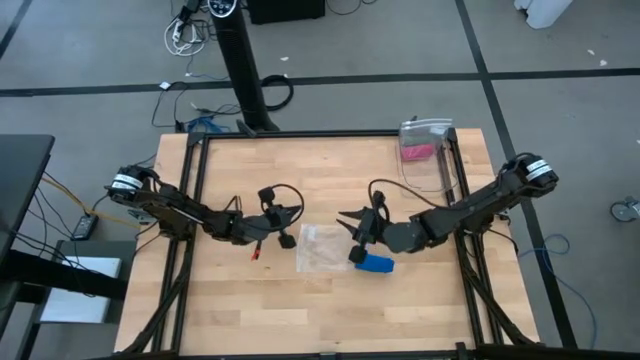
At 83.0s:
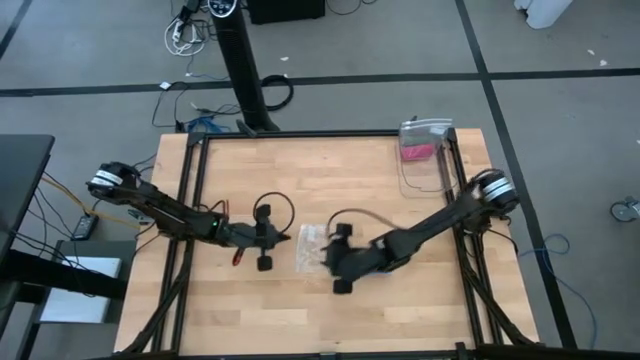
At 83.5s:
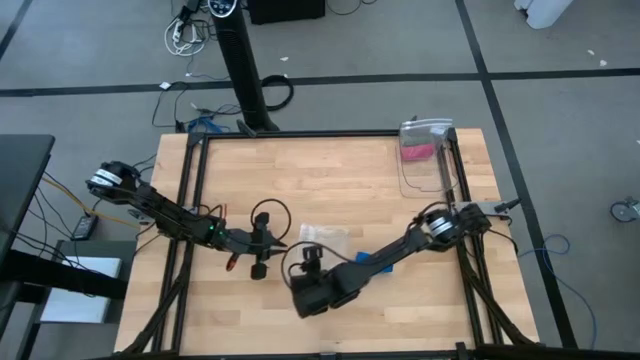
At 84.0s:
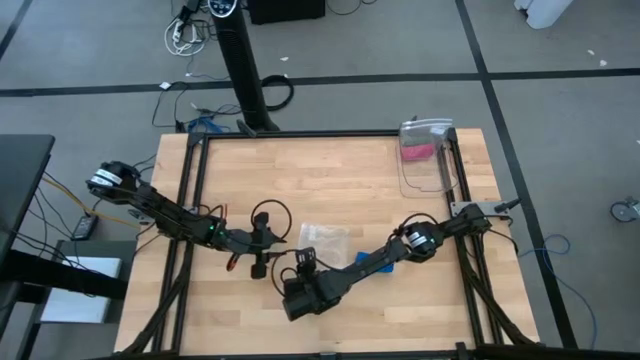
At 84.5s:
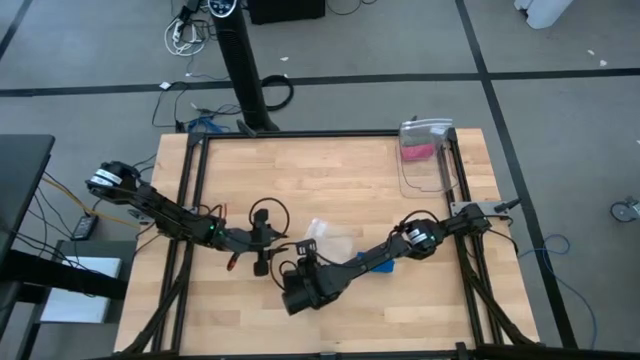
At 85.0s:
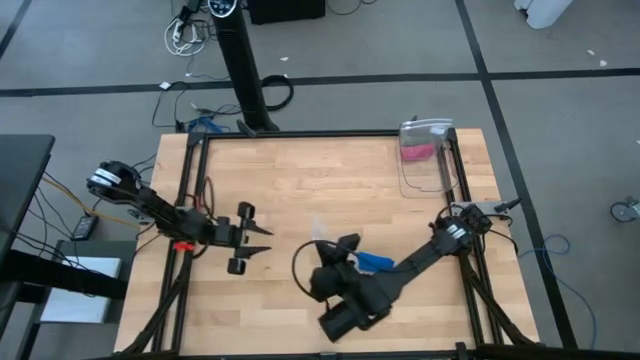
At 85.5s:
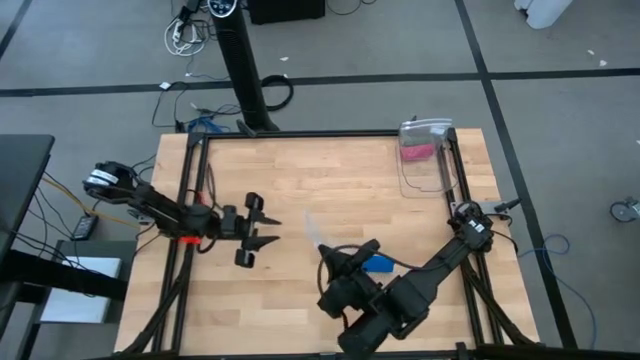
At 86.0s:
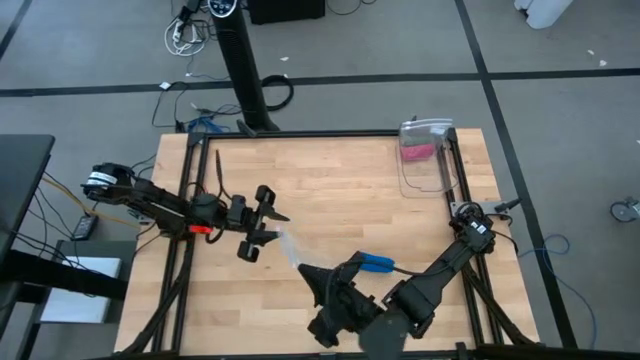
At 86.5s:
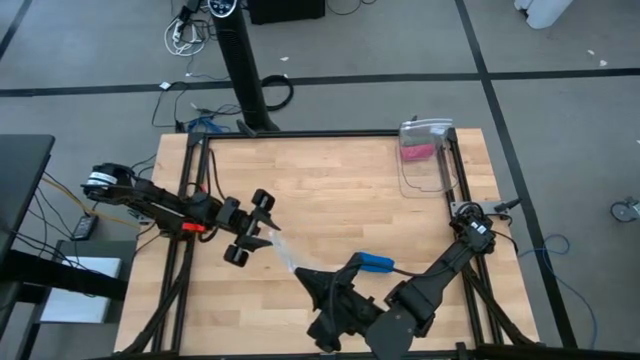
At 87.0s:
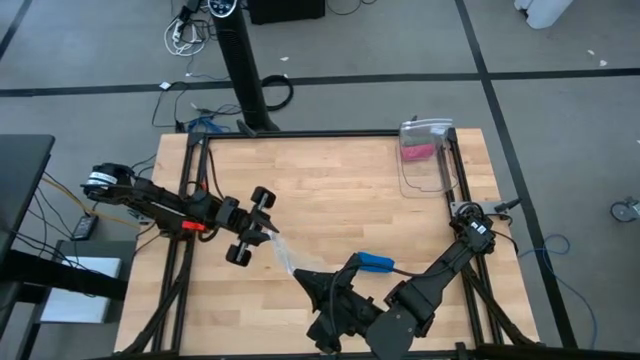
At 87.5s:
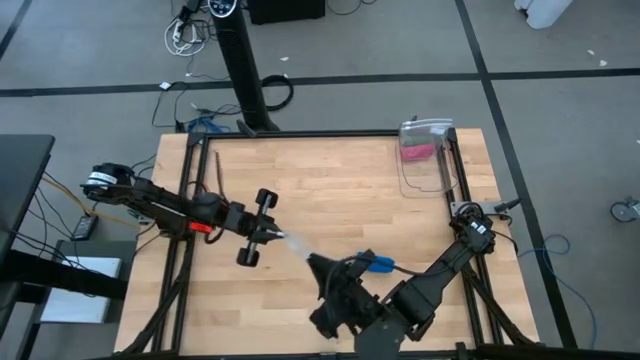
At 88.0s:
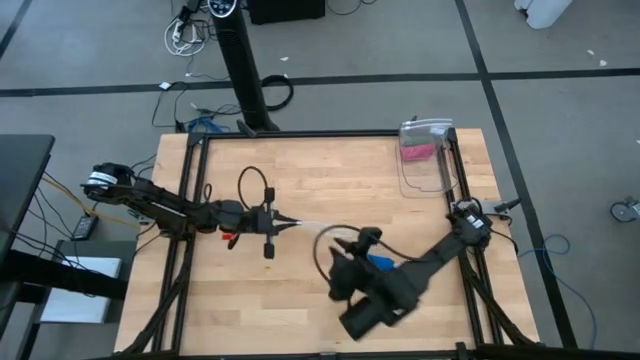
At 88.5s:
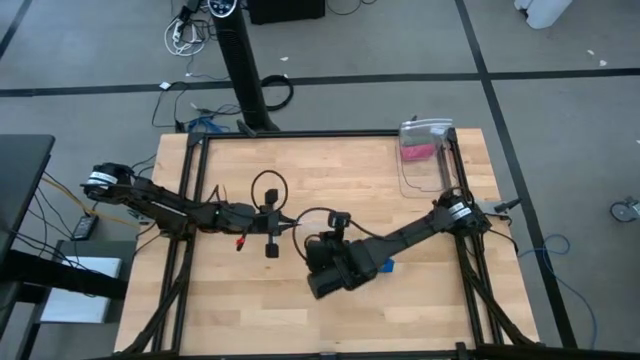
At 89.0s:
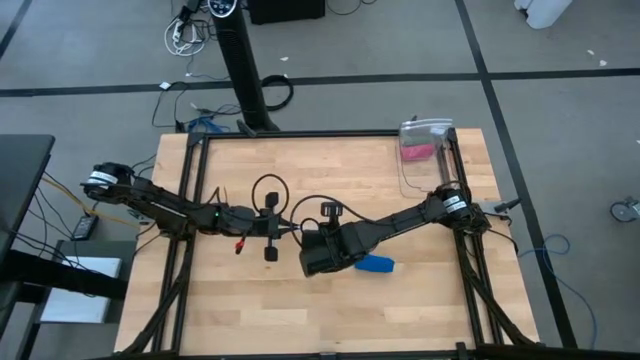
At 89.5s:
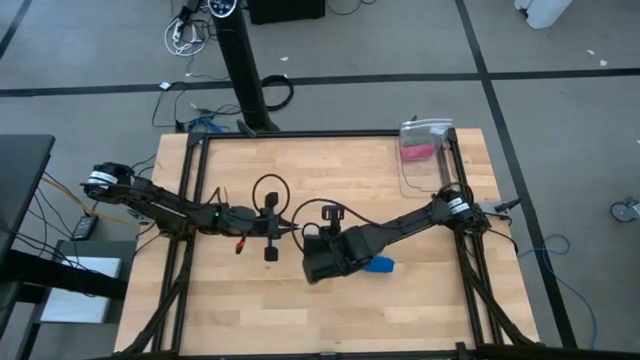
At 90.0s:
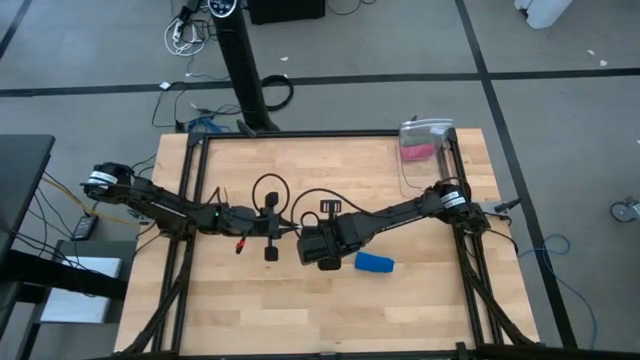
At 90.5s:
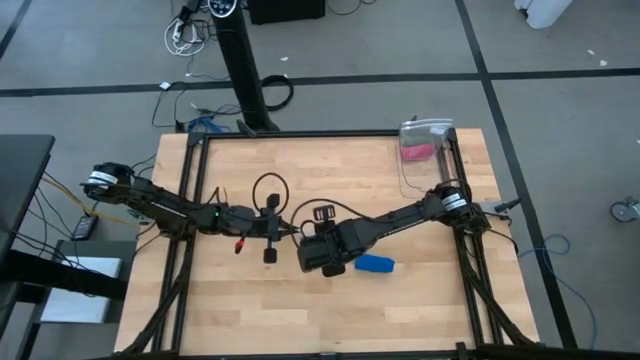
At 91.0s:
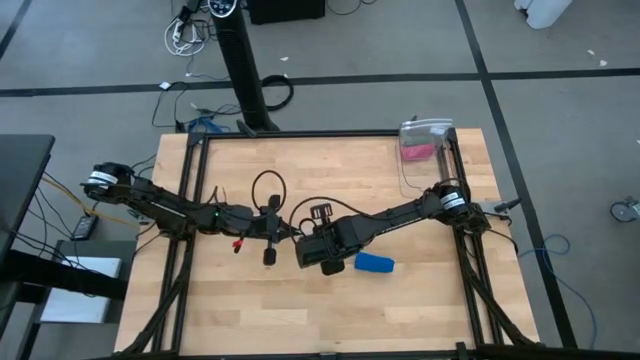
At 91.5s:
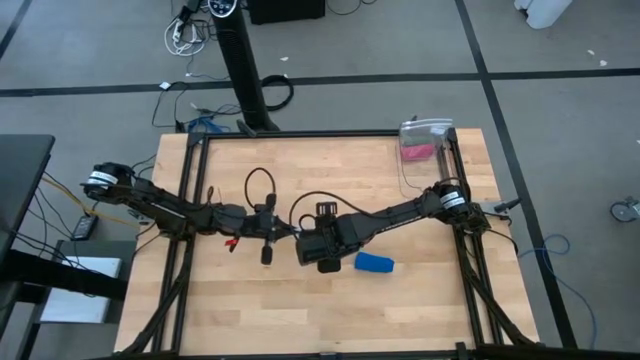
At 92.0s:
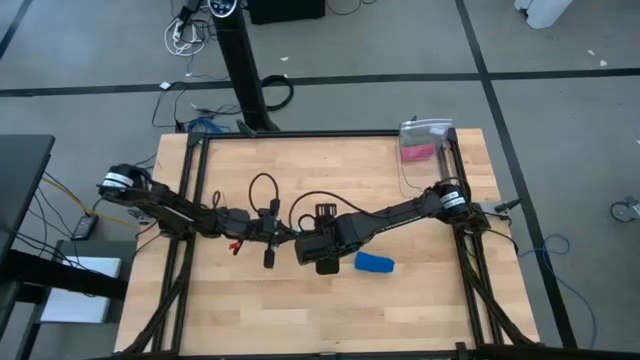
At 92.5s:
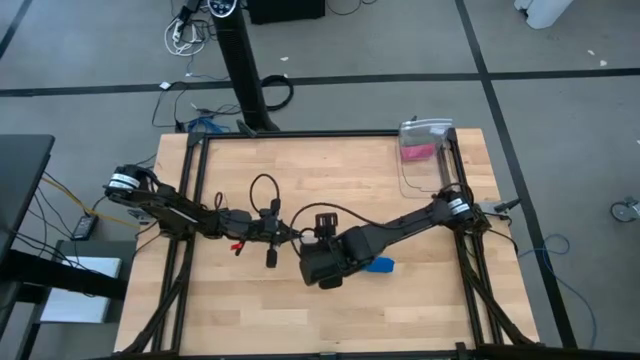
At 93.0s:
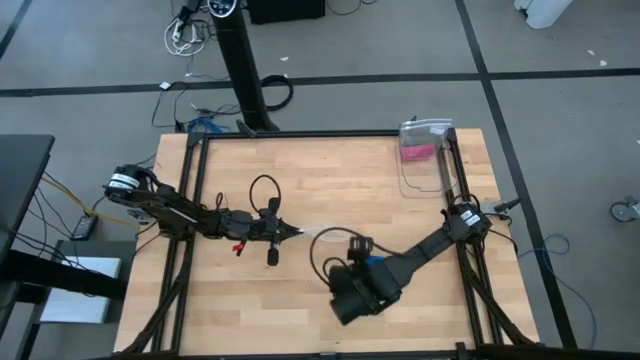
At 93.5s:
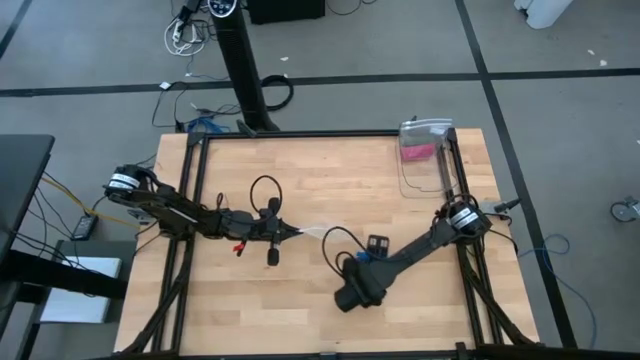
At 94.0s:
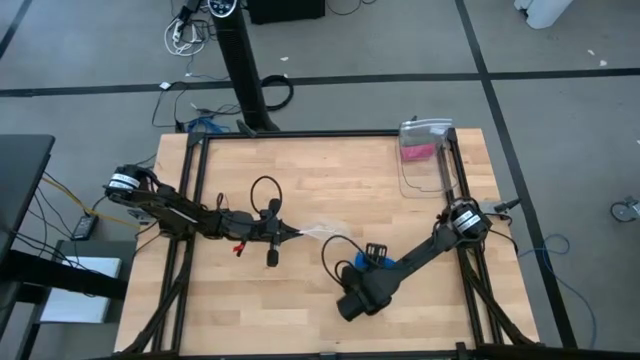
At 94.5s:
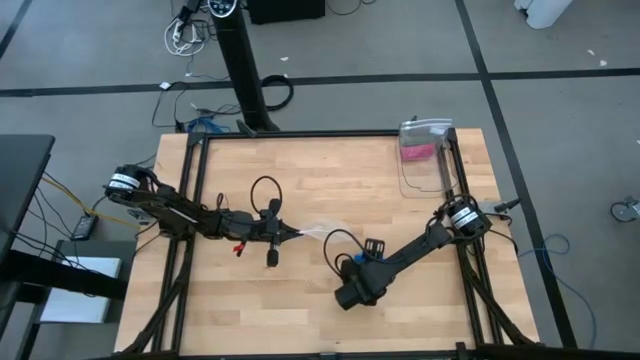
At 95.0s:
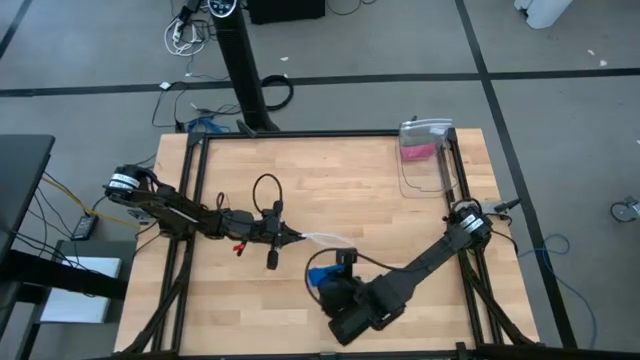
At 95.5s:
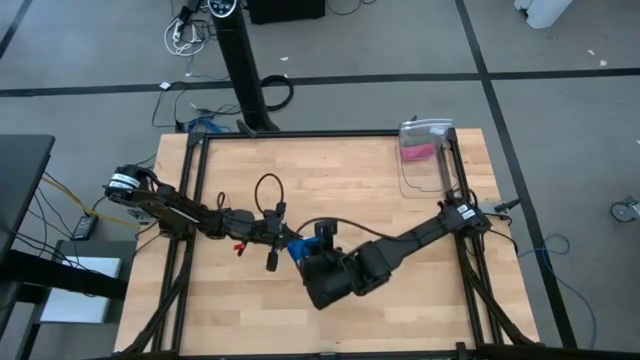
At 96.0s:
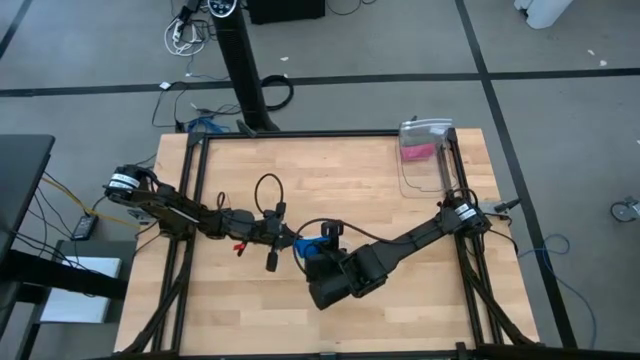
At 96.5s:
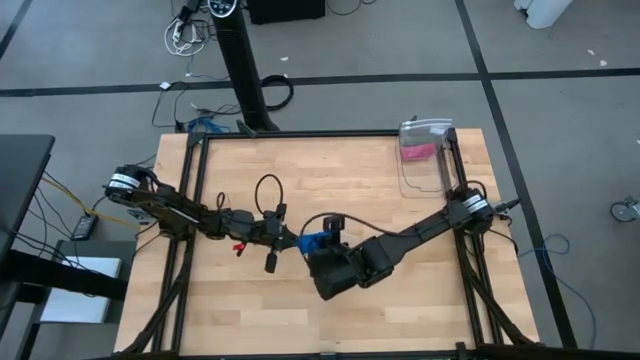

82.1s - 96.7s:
Task: Roll bandage
Put the blue rolled bandage into the transparent zip bag

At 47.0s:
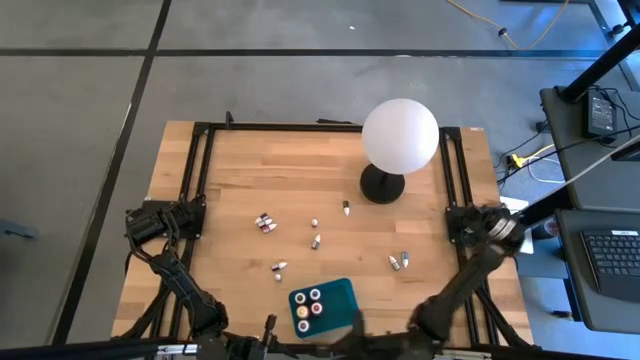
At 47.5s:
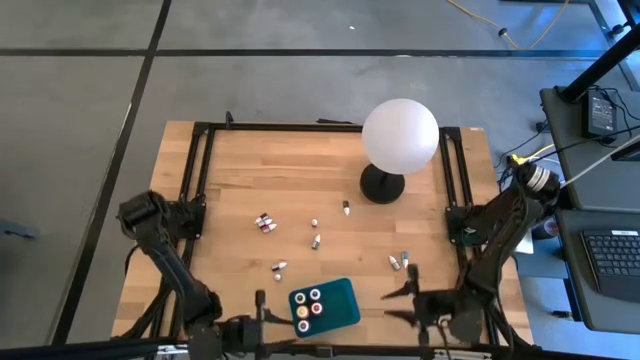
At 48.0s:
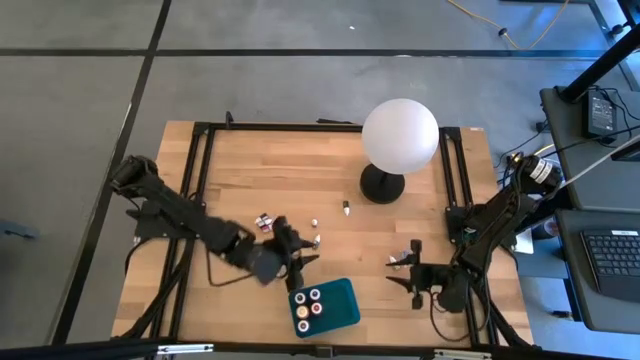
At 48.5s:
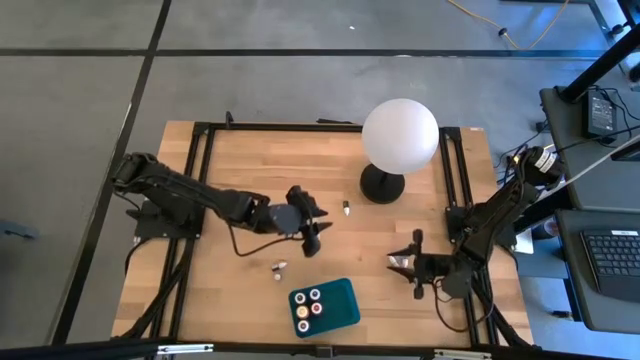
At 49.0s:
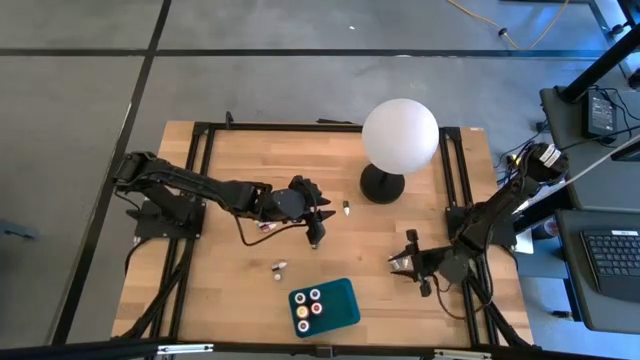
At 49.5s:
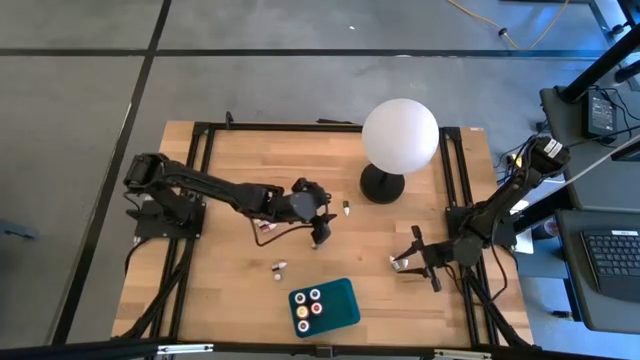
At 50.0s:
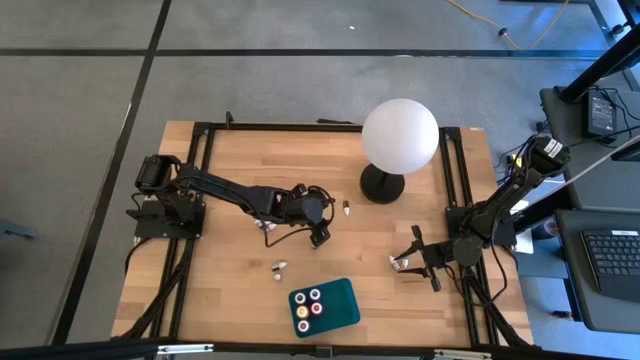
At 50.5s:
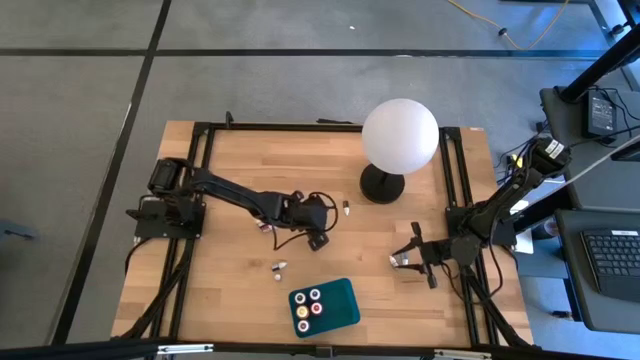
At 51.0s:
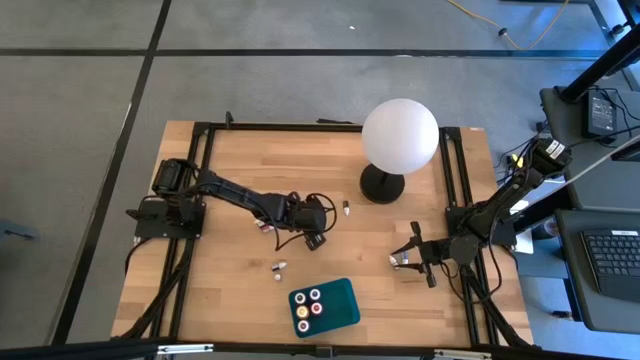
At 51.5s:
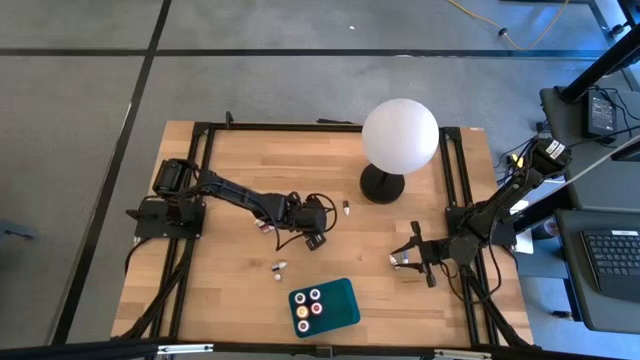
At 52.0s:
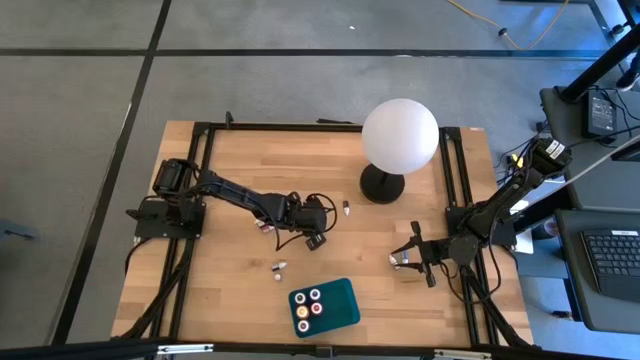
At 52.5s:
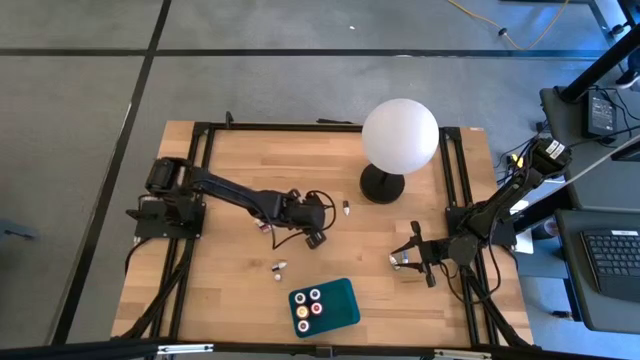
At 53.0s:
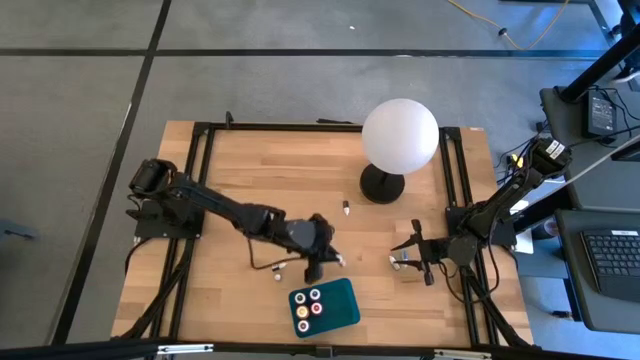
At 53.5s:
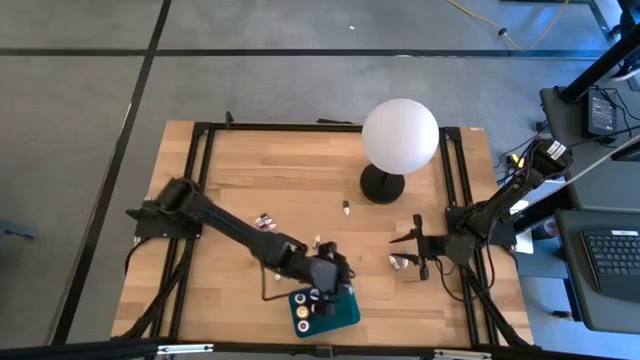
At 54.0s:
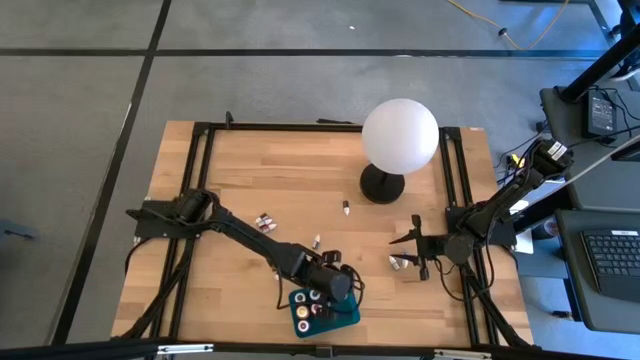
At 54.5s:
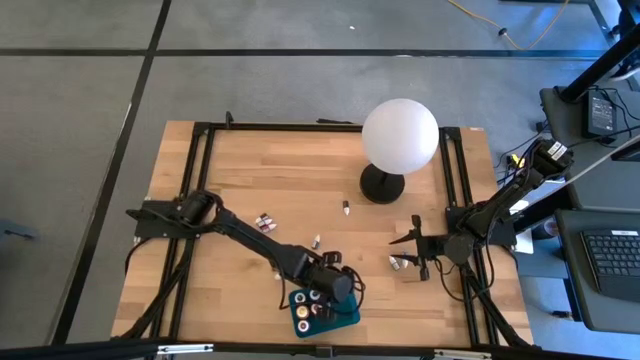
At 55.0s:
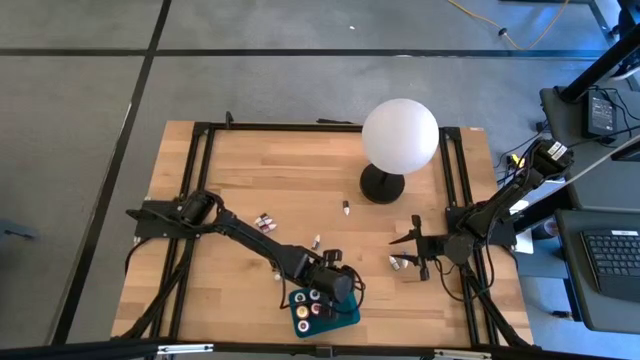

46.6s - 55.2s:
Task: Pick & Place food coloring
Put the small red food coloring bottle into the blue bin
